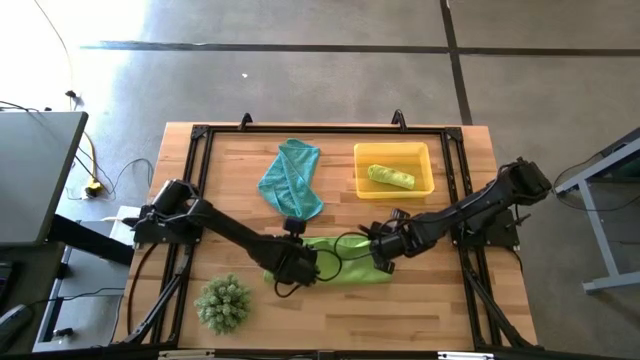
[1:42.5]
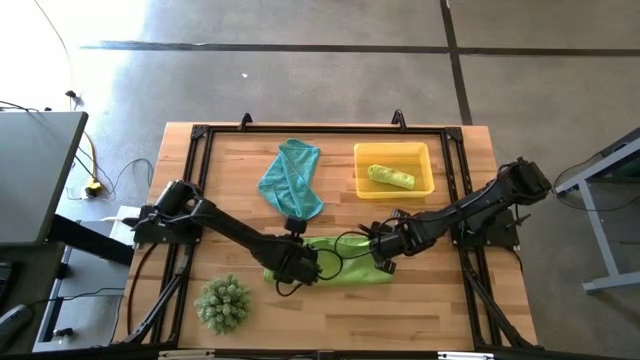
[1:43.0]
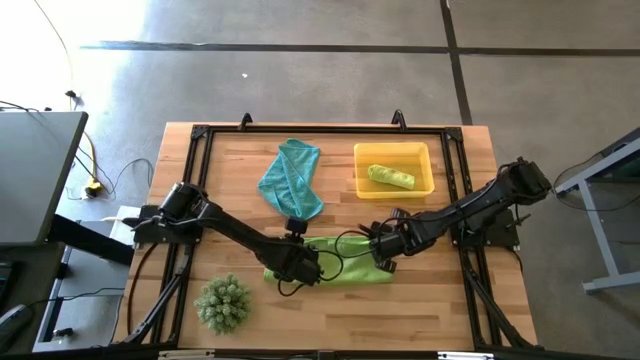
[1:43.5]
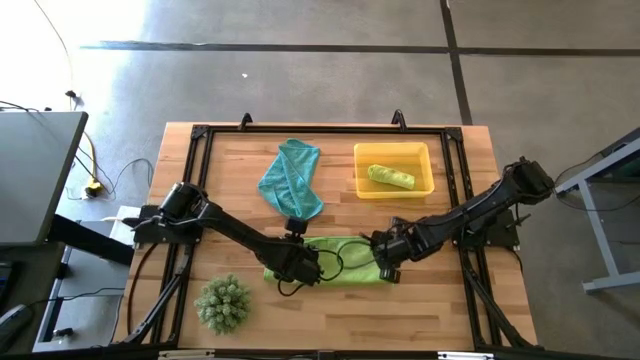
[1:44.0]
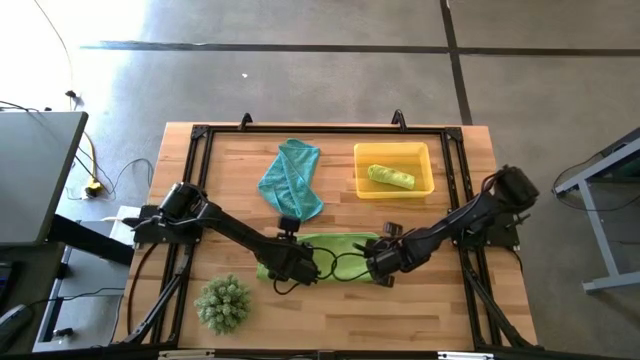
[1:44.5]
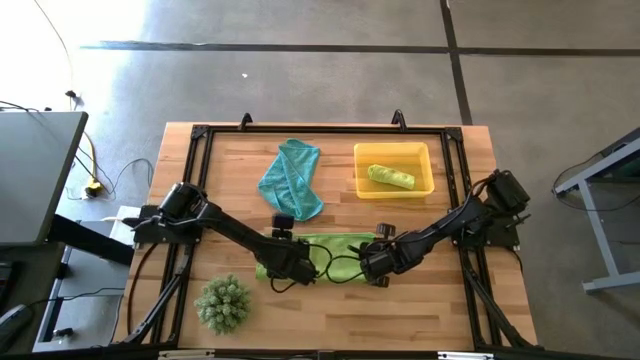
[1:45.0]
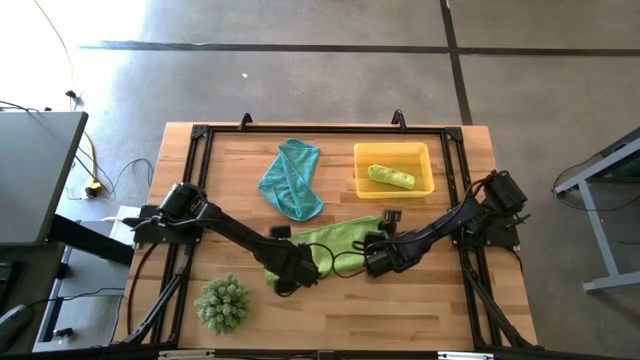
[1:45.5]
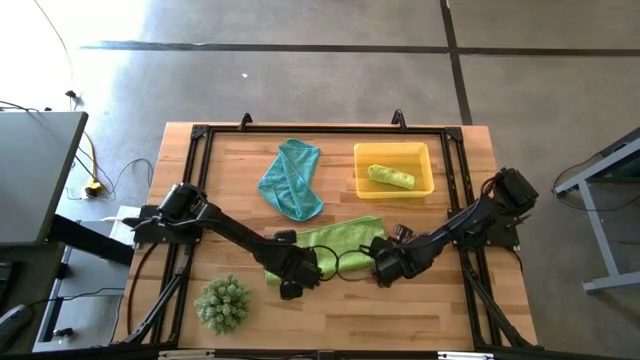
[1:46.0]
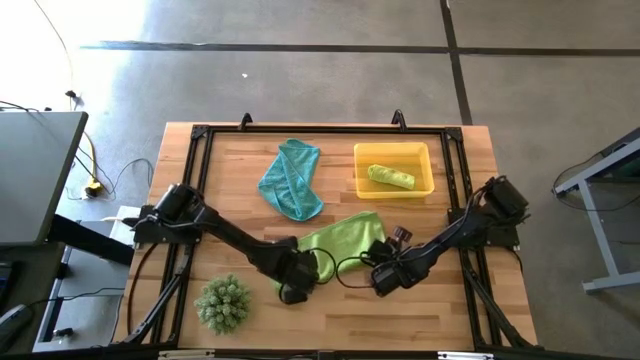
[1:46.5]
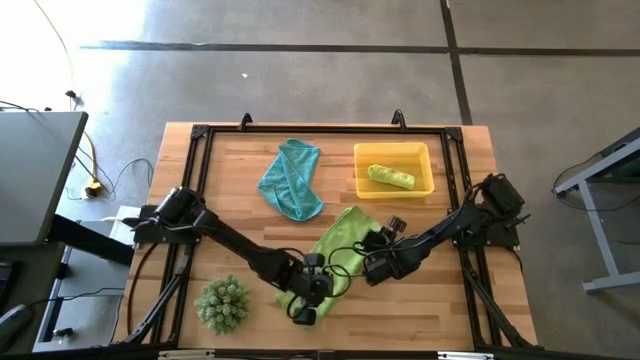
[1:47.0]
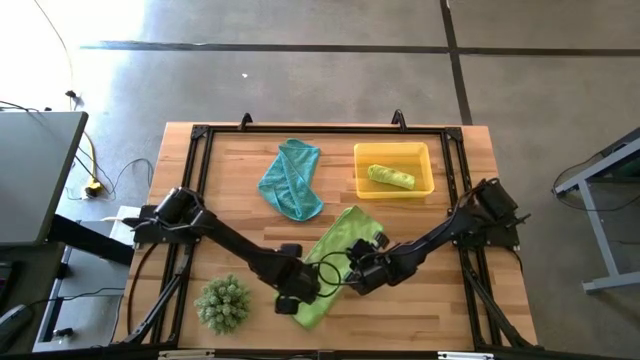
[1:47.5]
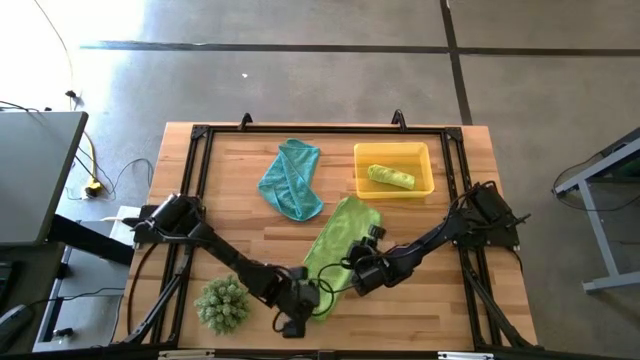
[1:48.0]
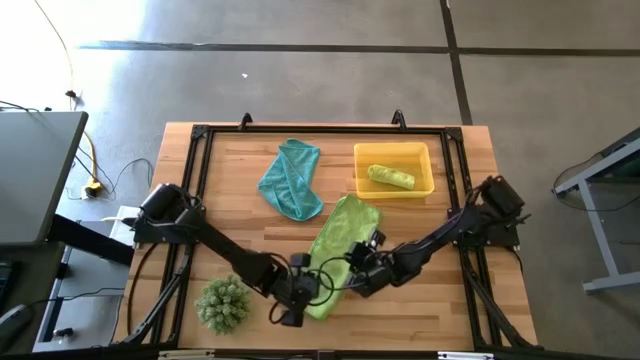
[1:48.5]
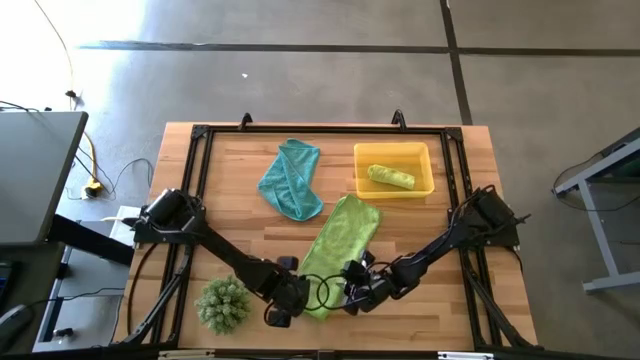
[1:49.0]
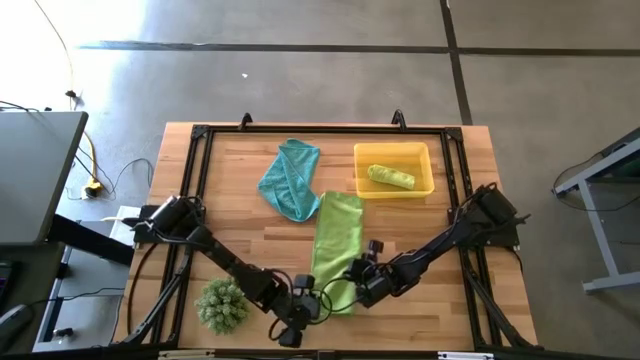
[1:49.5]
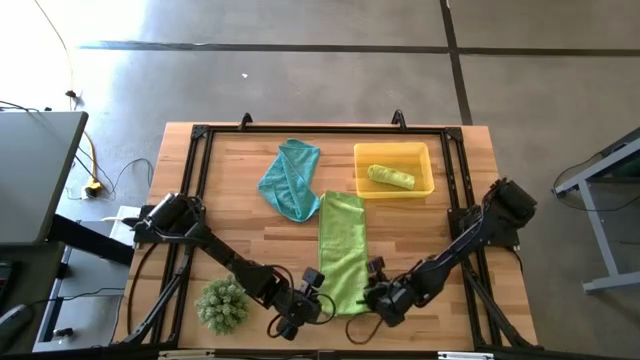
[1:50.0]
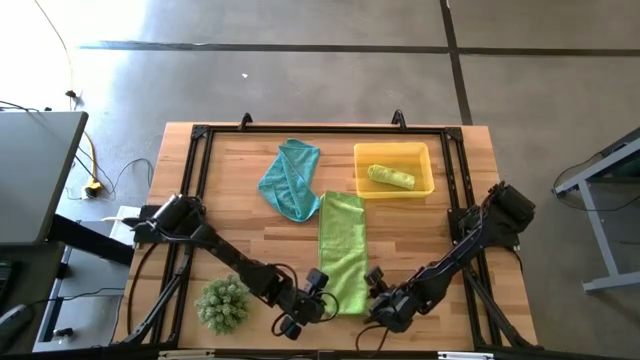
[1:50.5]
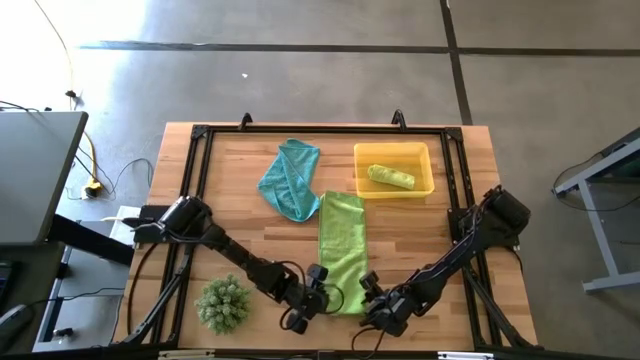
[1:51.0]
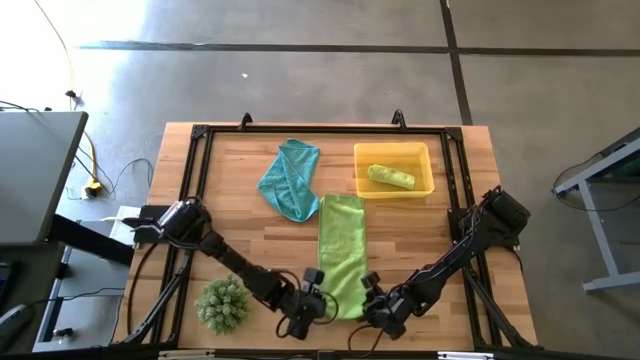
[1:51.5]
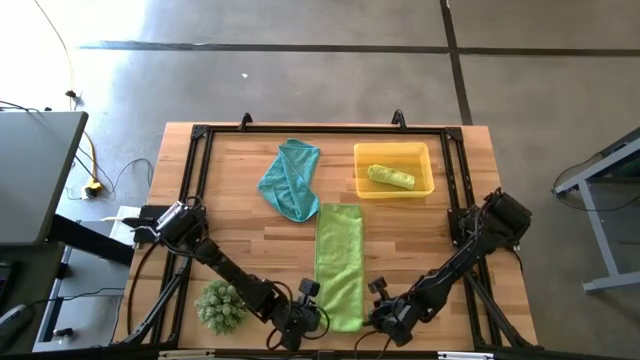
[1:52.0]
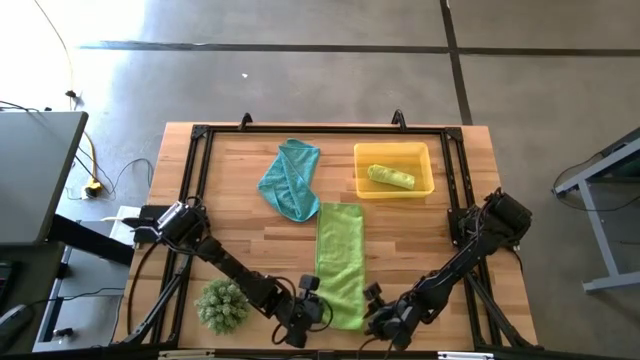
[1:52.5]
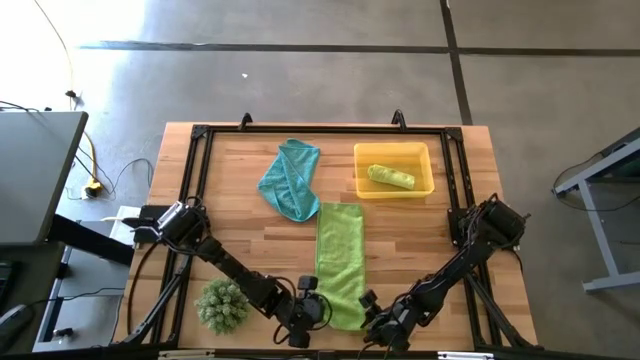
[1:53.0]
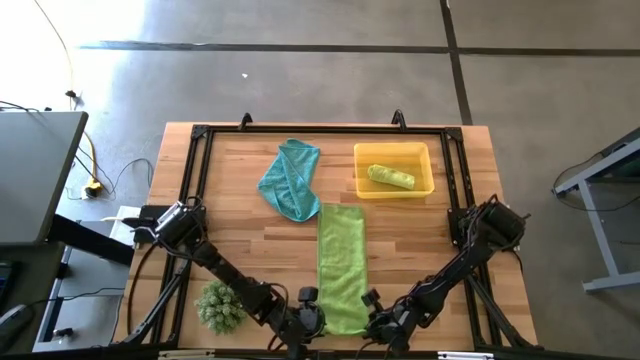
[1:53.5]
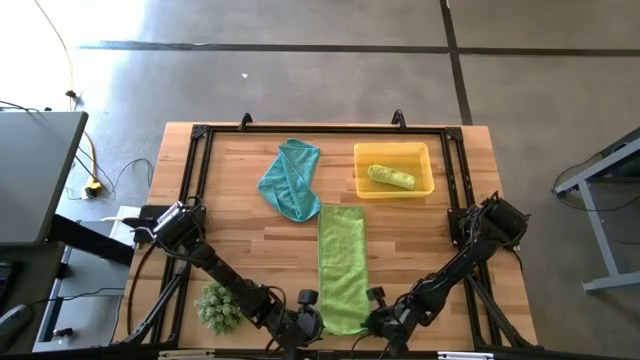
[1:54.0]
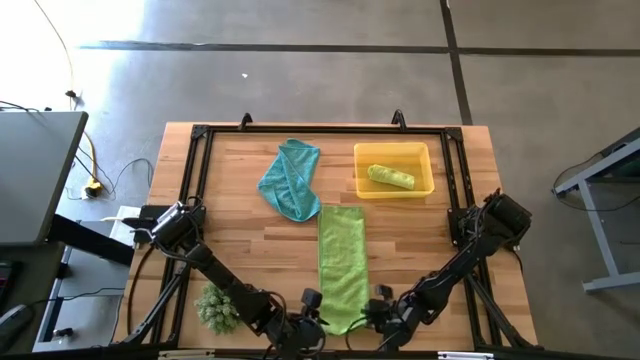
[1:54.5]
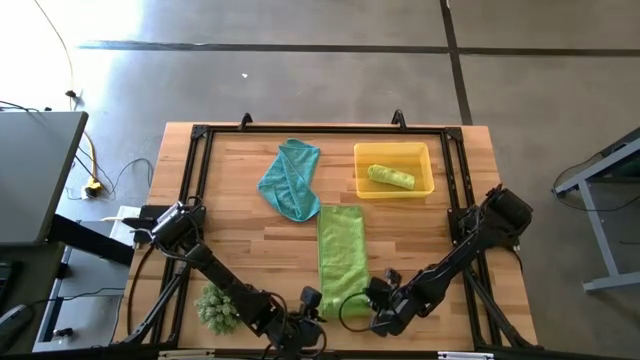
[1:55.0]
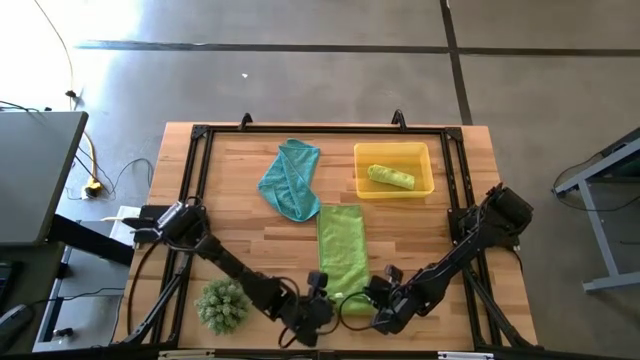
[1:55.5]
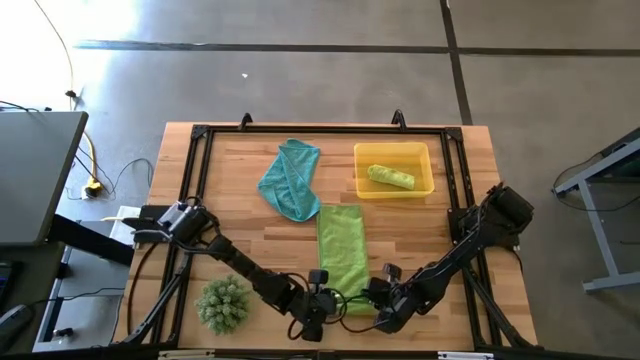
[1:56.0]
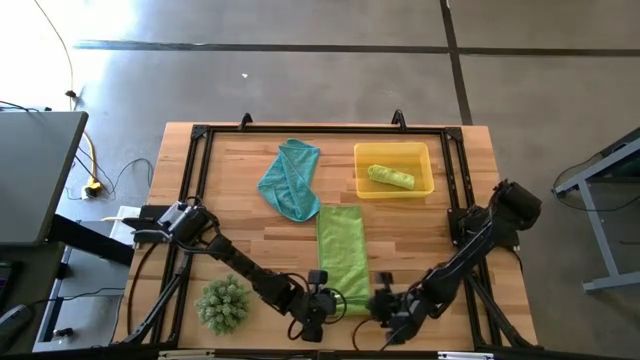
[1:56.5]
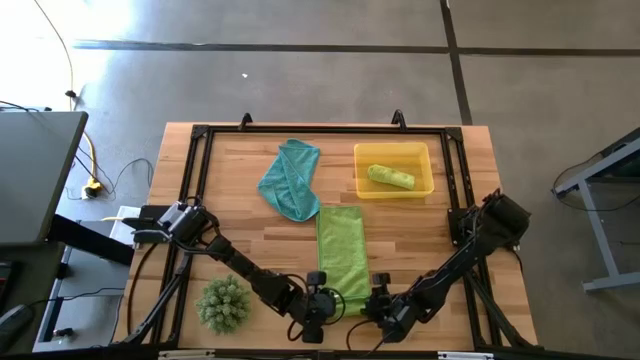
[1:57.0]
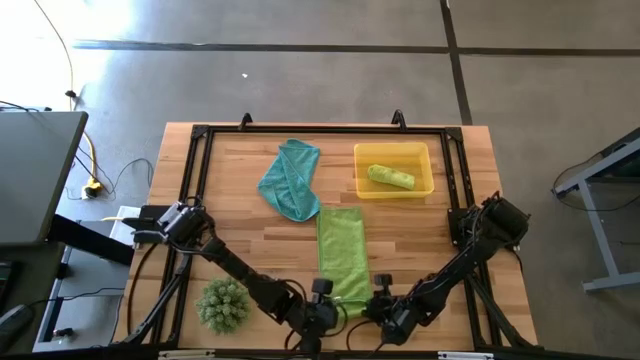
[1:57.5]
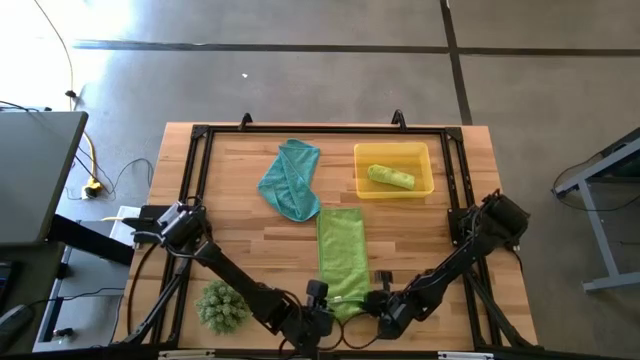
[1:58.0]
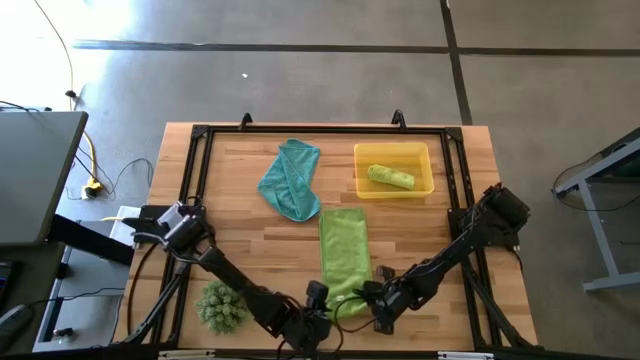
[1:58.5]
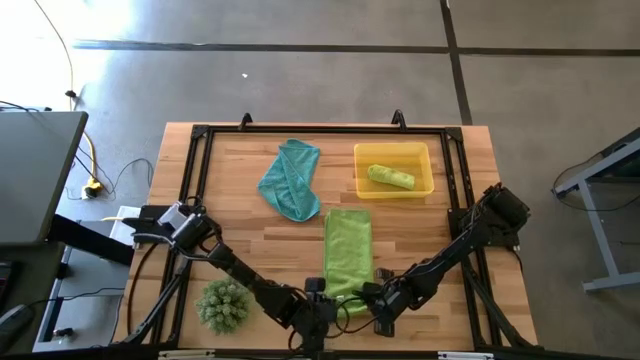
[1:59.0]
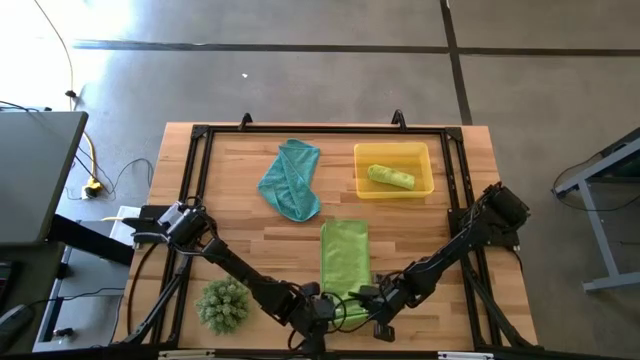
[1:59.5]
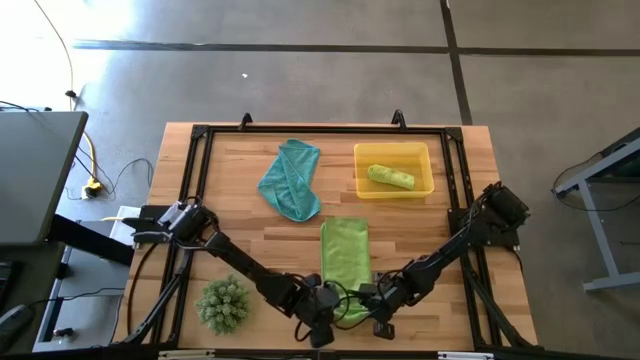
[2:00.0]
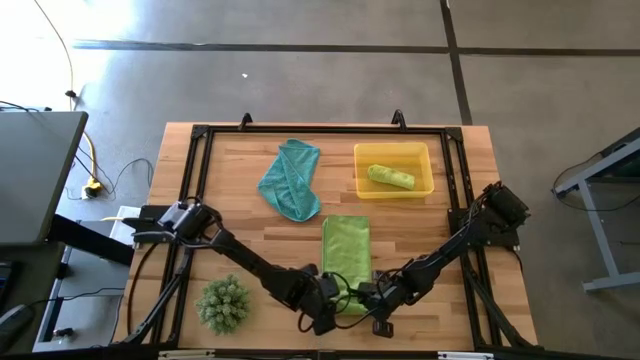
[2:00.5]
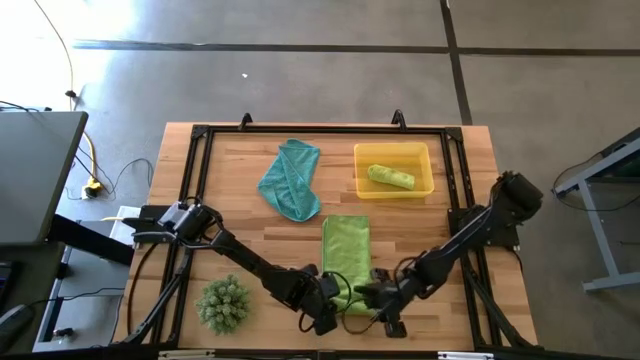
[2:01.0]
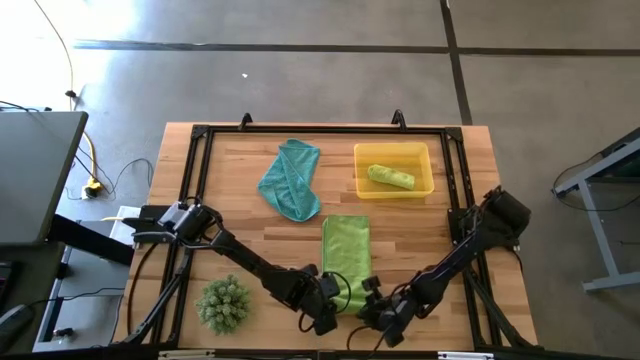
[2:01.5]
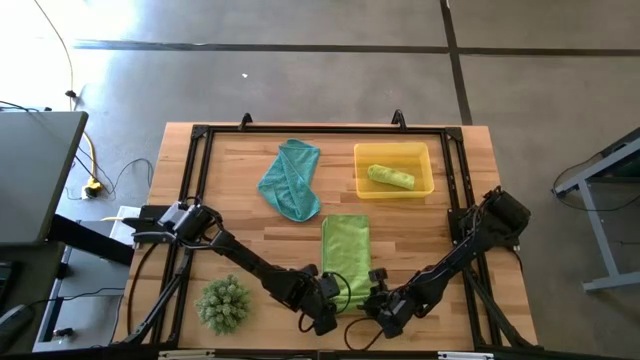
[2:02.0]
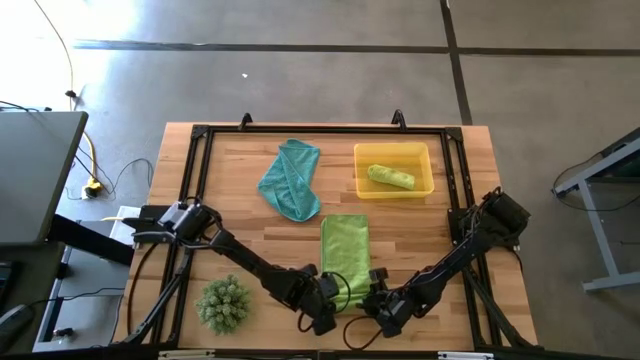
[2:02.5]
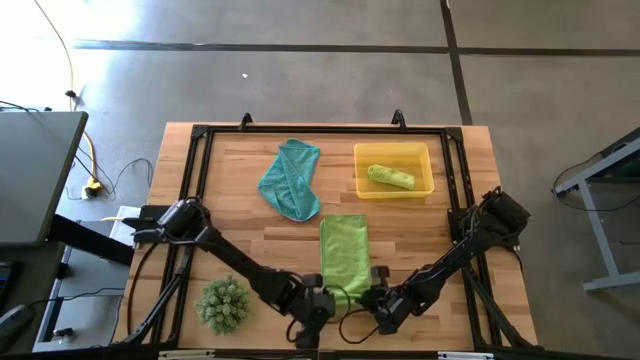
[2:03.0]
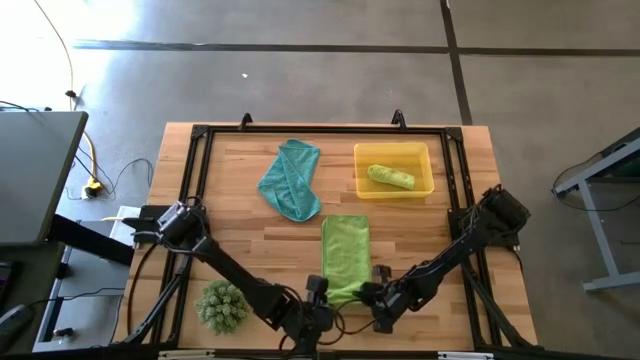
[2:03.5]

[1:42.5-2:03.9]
Task: Roll microfiber towels into tight, uniform cylinder then place into a basket
Roll the green towel

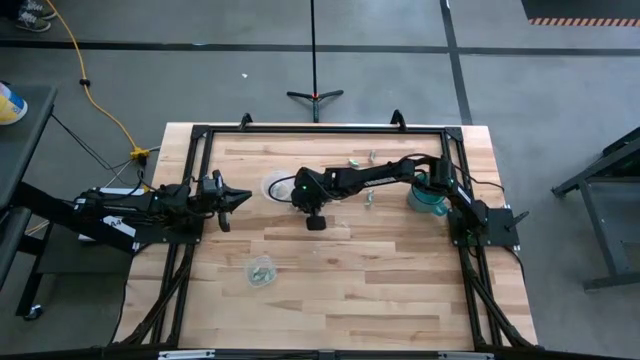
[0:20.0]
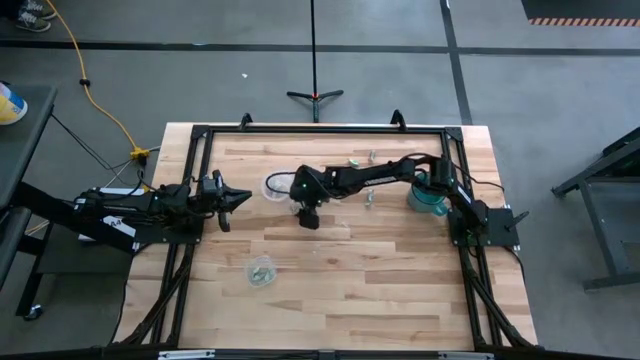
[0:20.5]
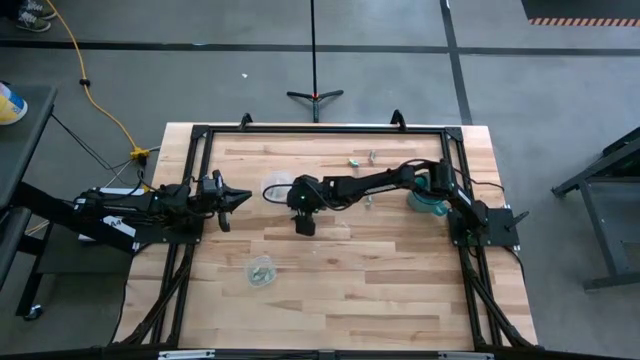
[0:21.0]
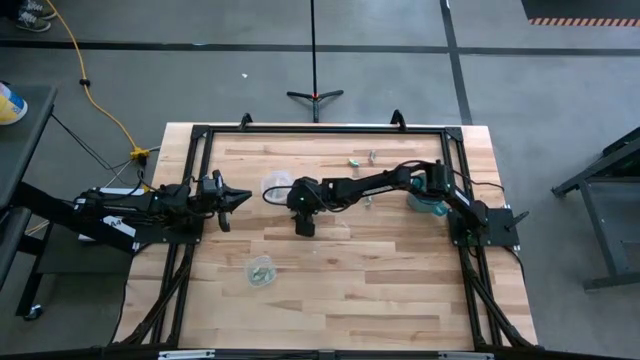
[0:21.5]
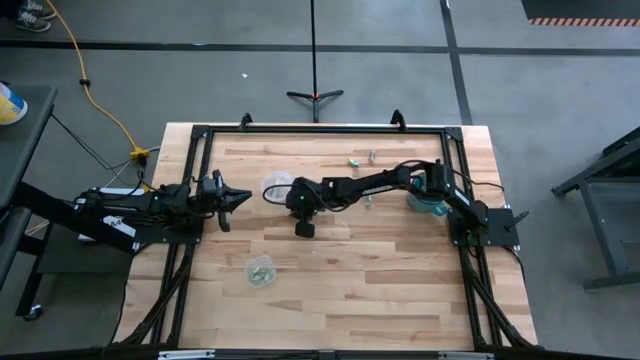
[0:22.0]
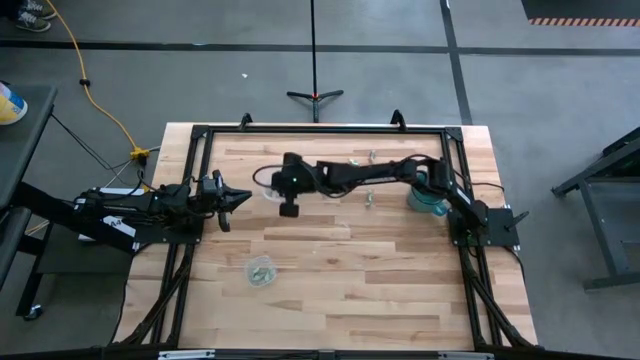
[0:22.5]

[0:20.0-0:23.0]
Task: Pick and place items into bin
Put the white stevia packet into the top transparent bin
